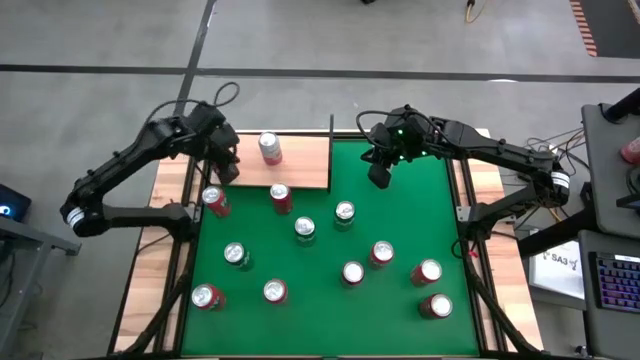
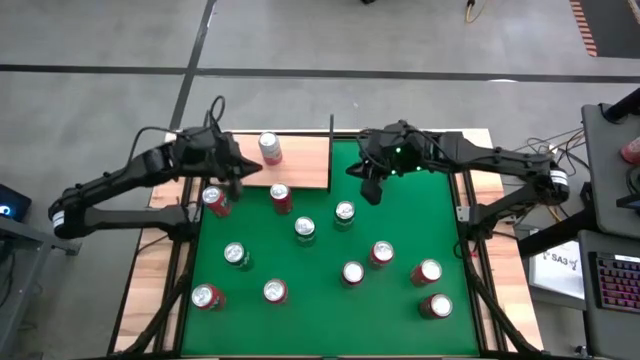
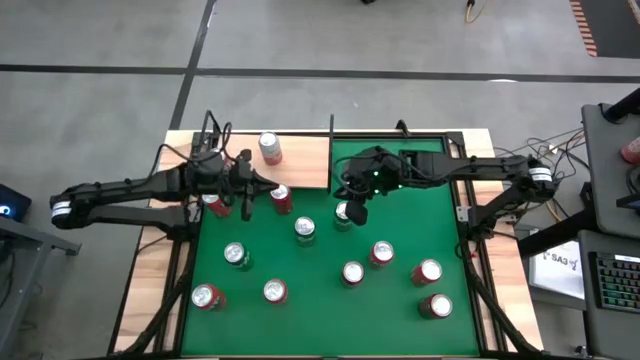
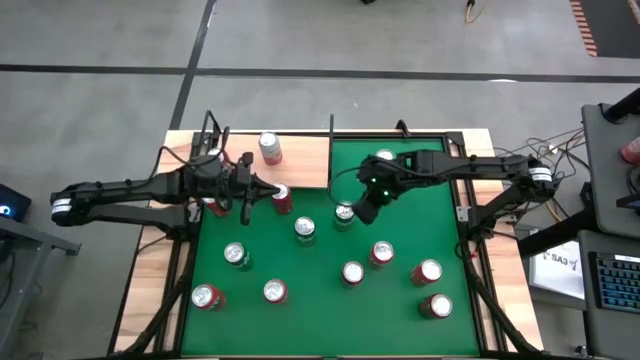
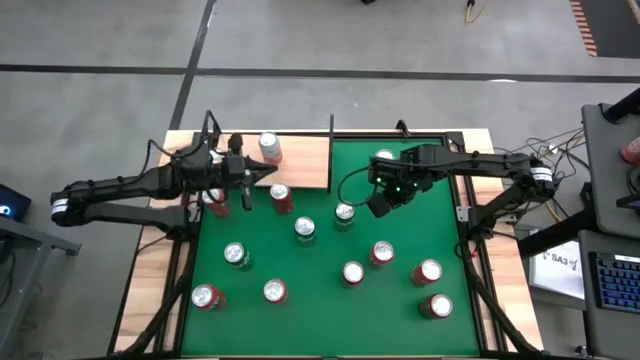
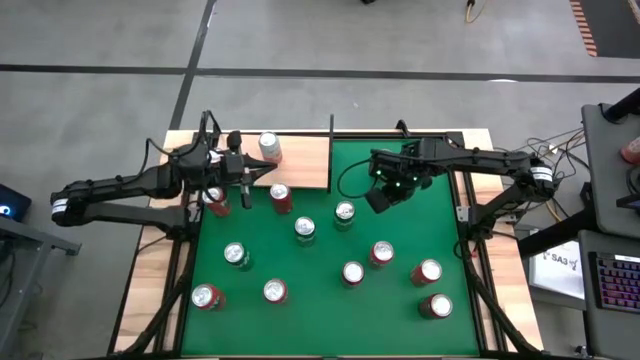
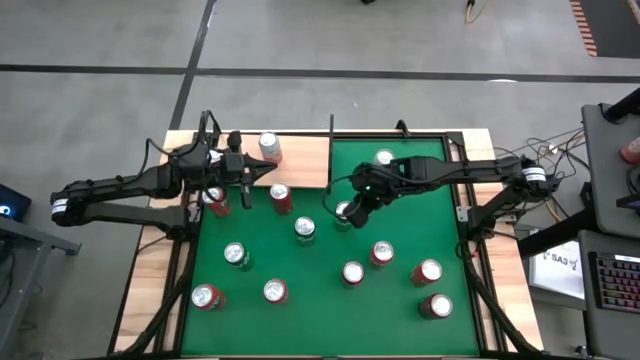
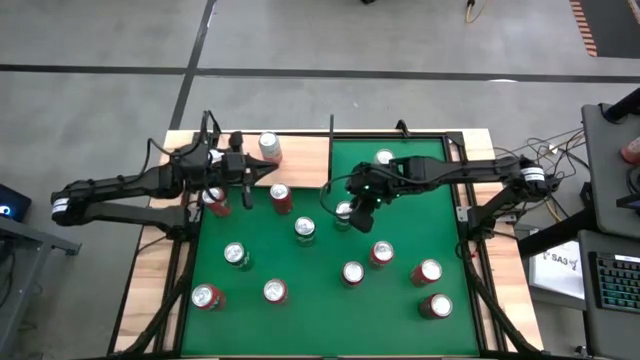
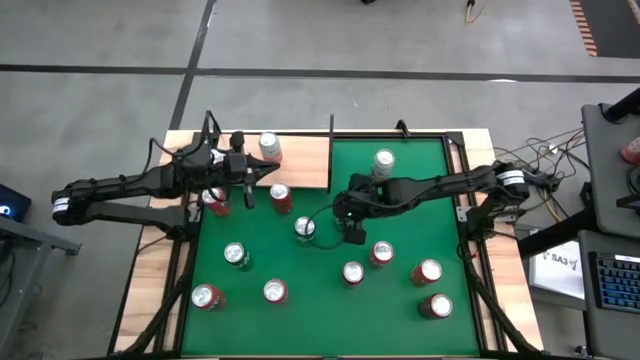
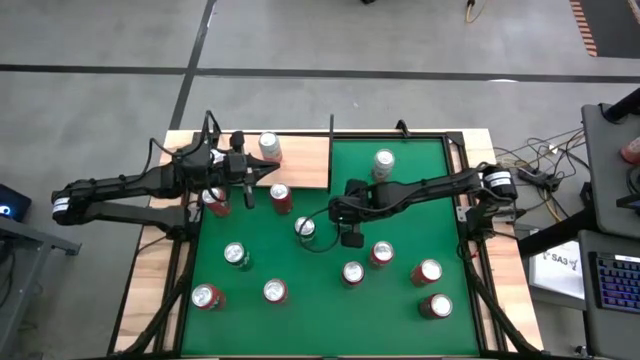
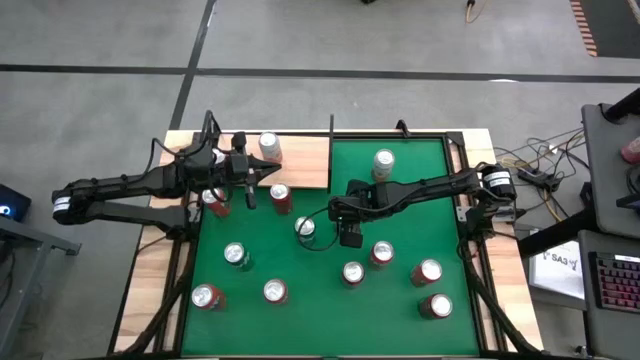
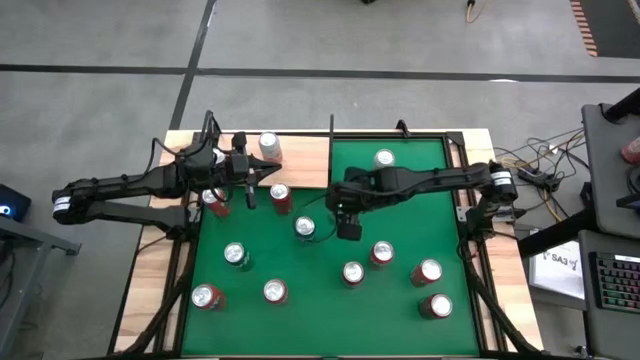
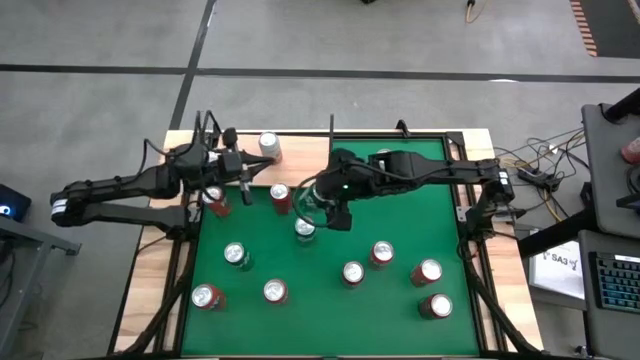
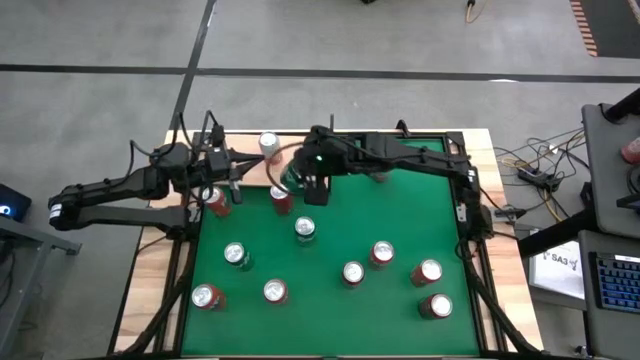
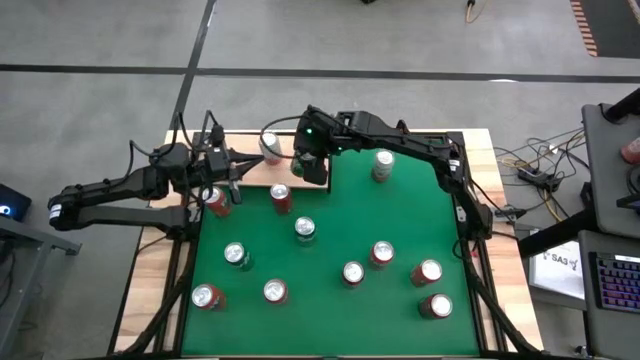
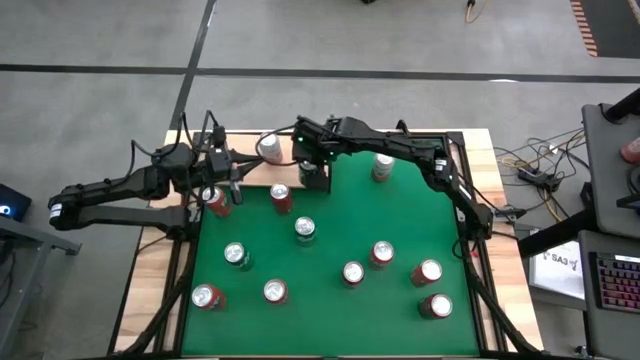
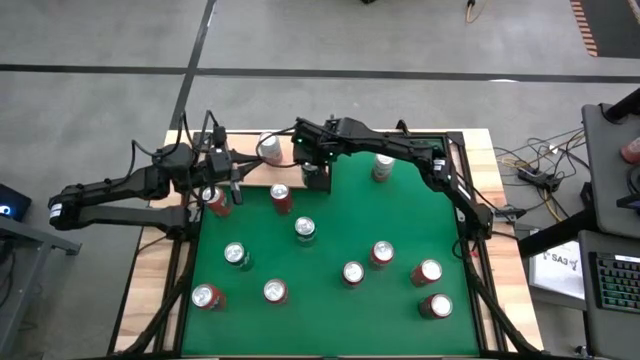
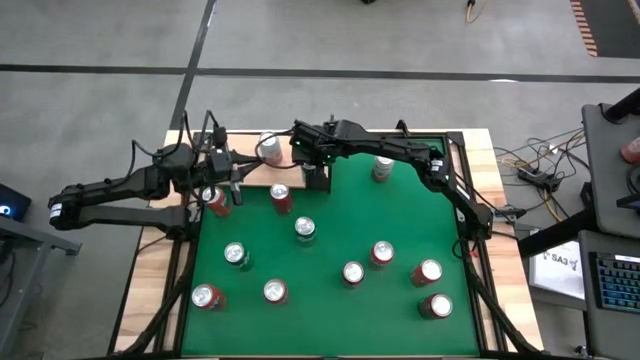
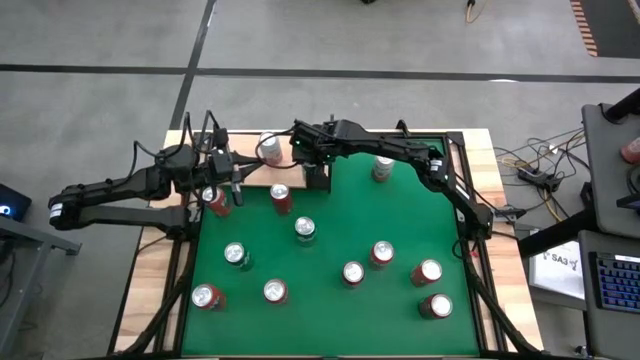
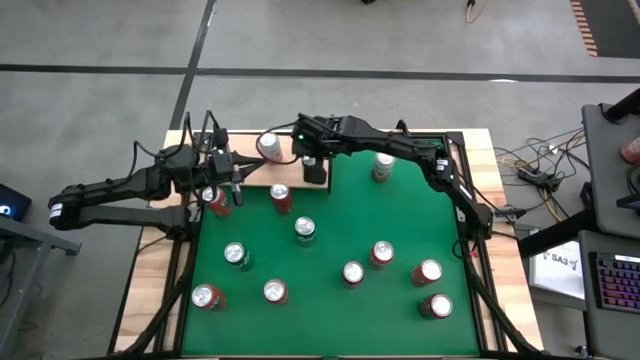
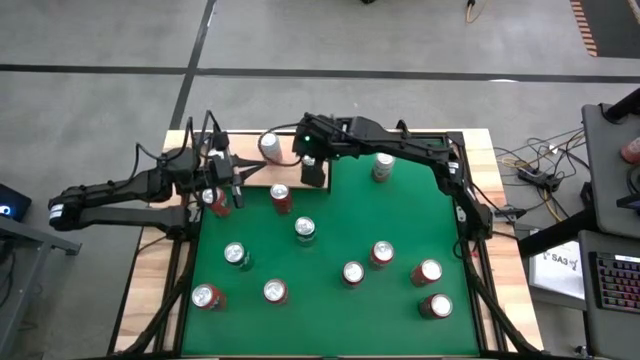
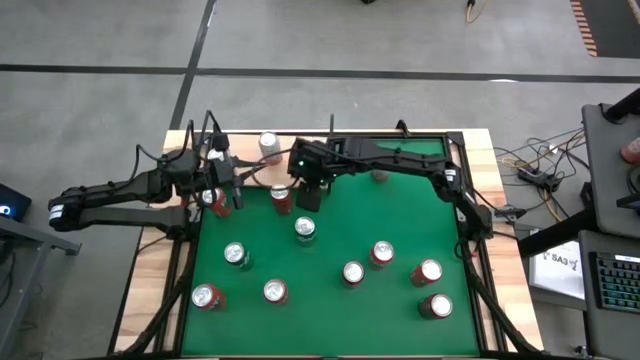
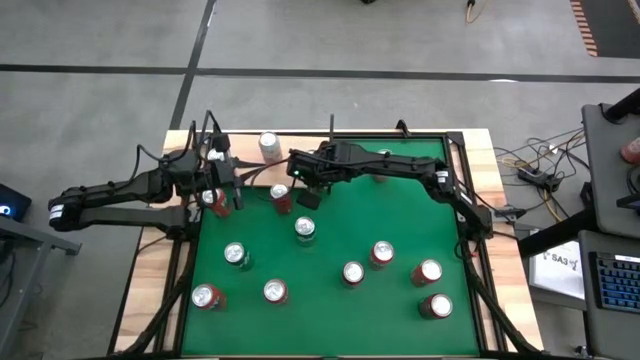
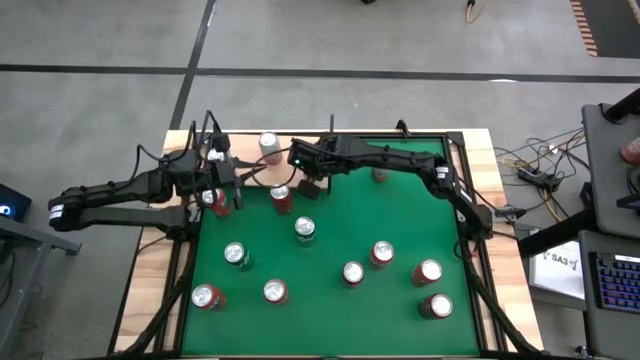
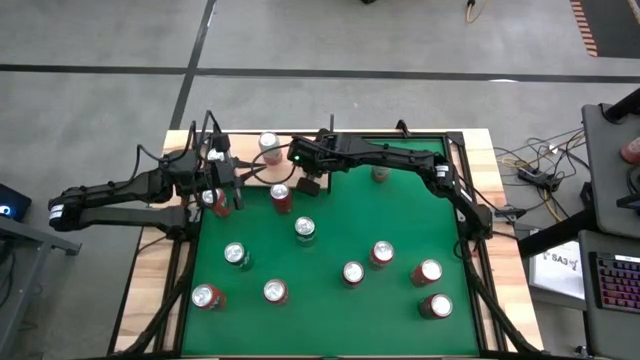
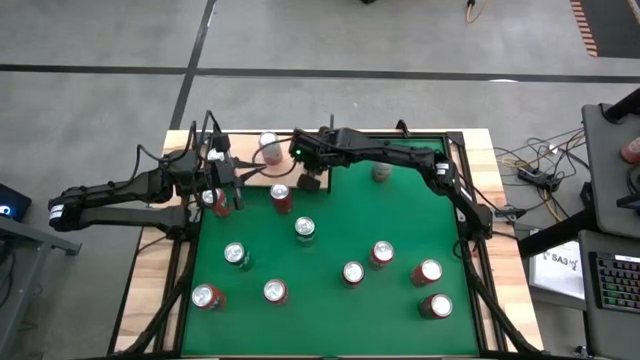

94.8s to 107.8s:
Task: Place canned beverage on shelf
Put the green soda can on the shelf

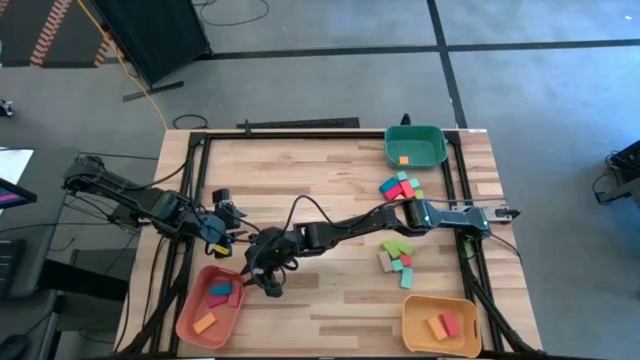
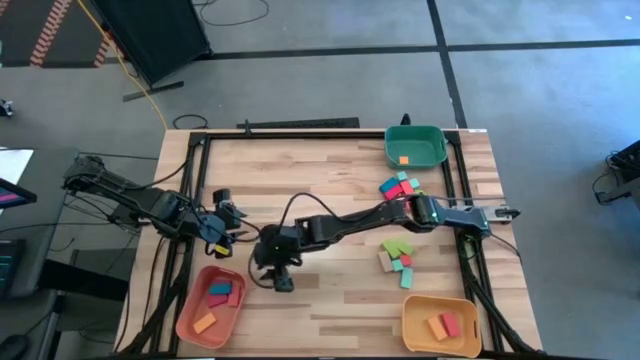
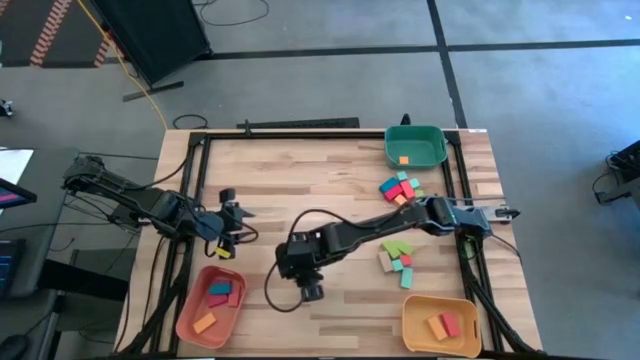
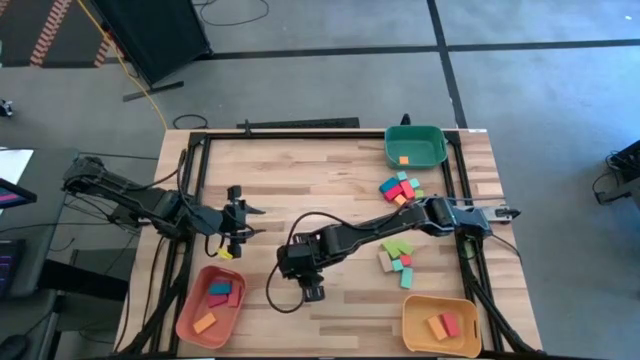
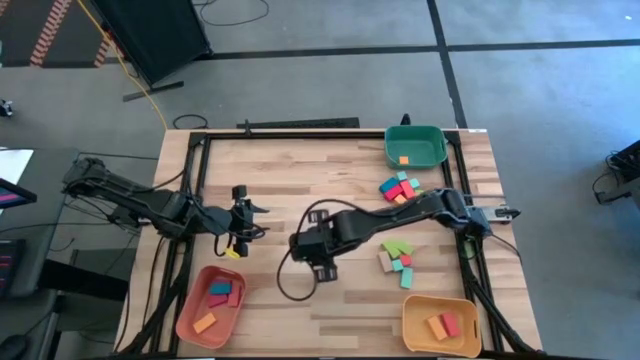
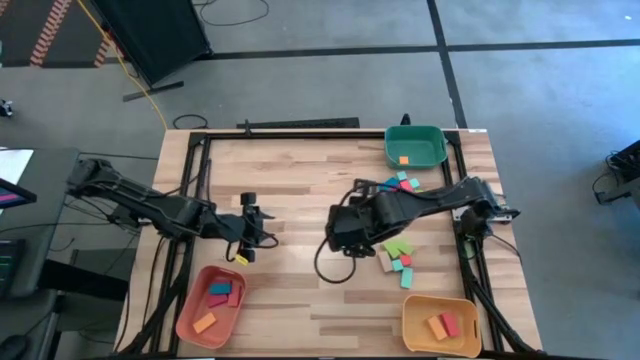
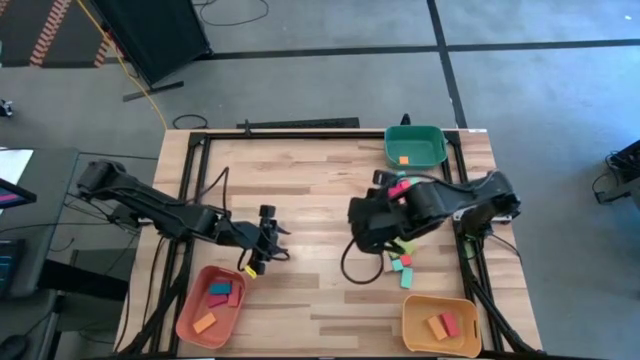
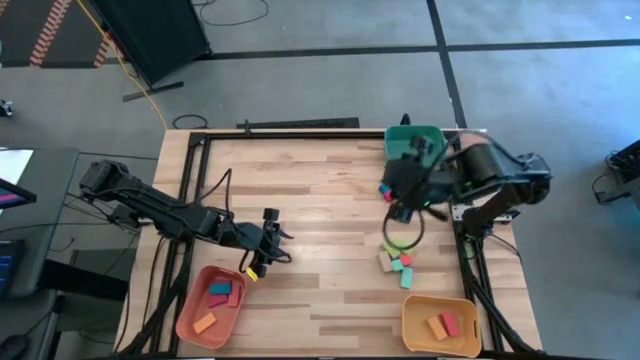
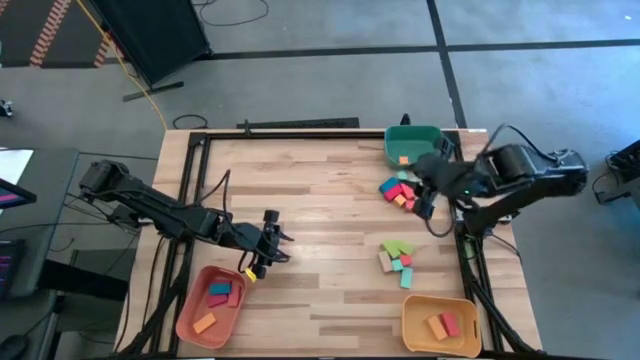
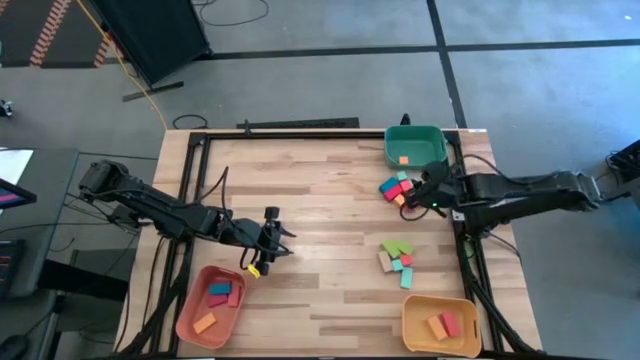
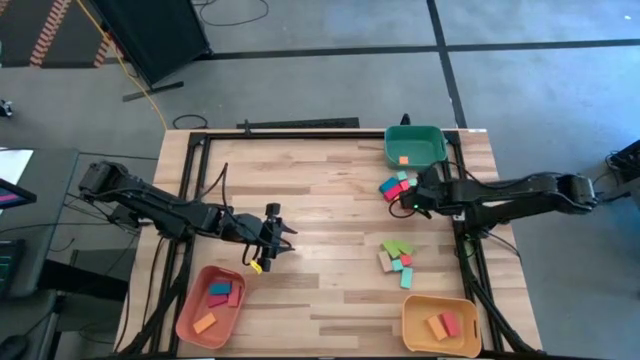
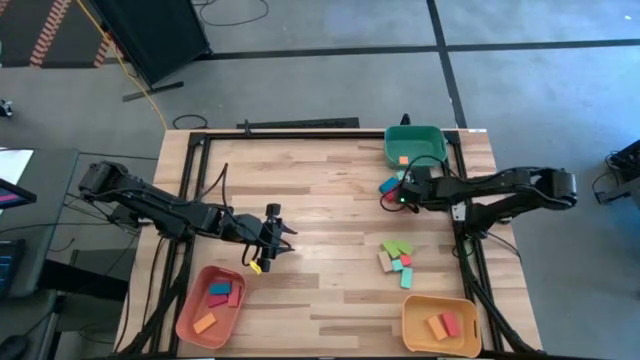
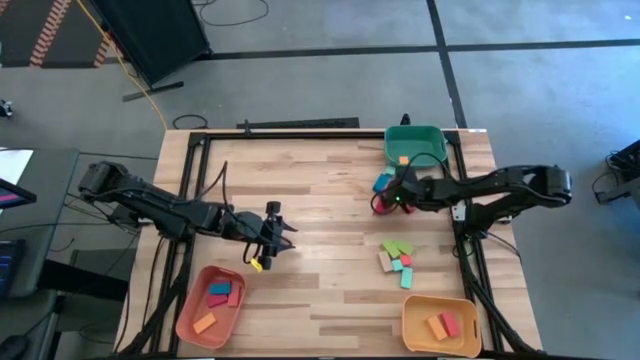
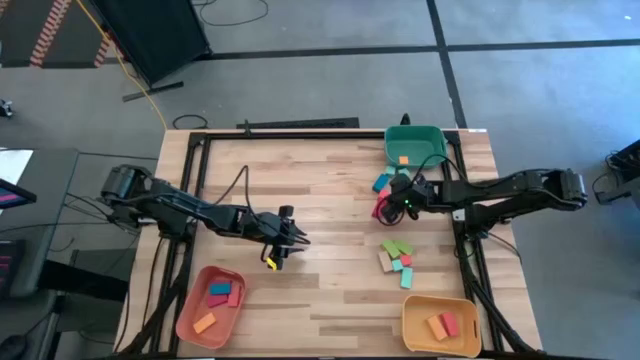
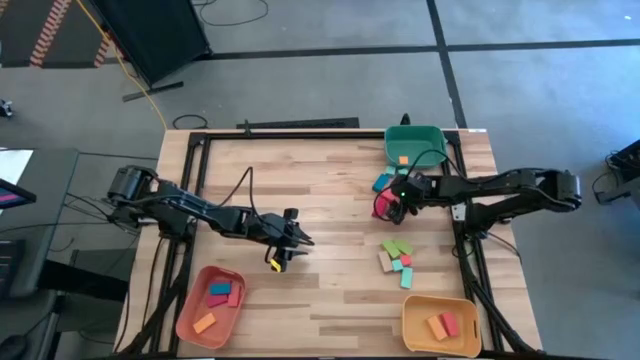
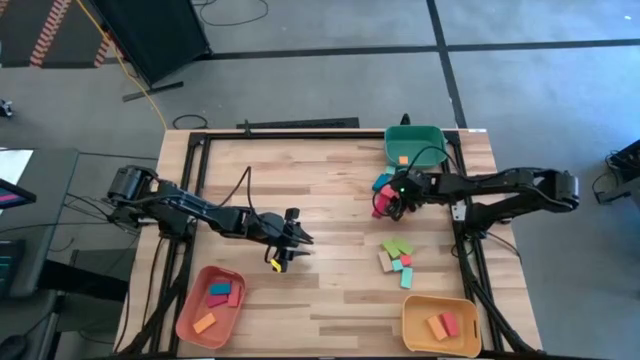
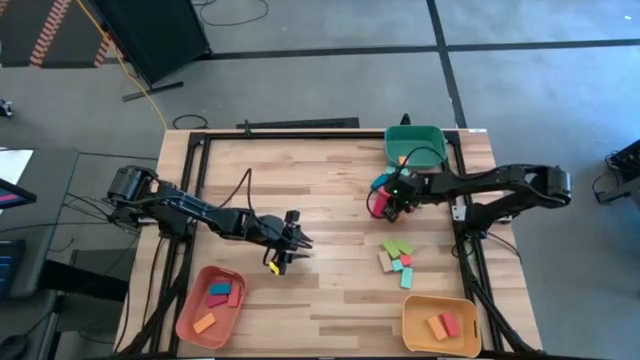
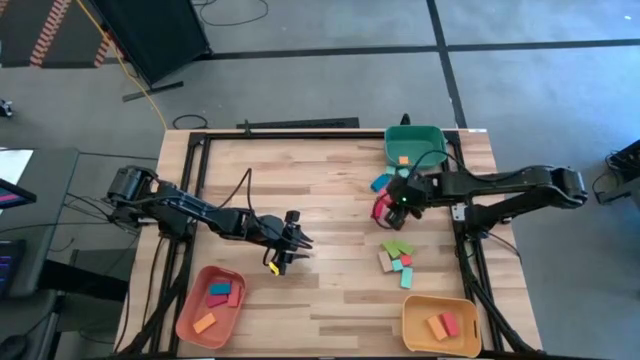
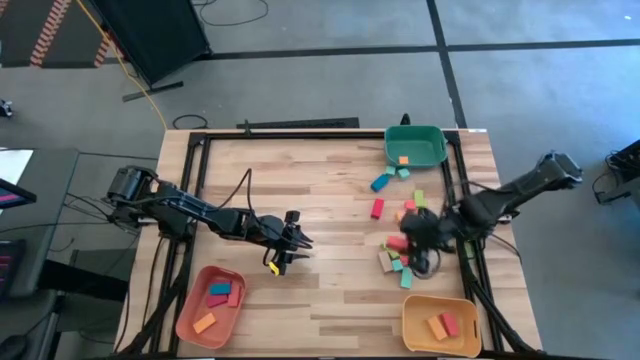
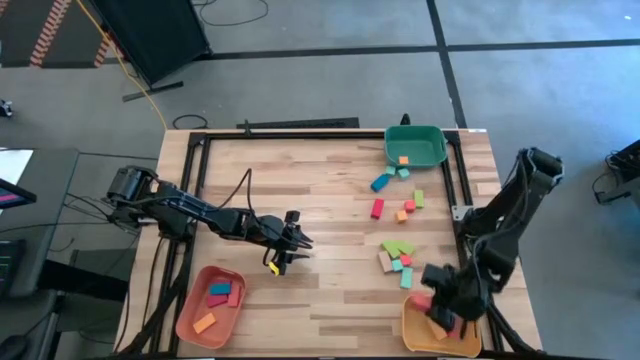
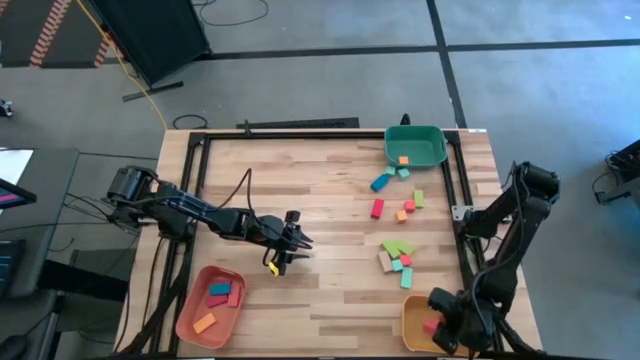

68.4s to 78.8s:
Task: Sort blocks by size
Put the large orange rectangular block into the yellow bin
